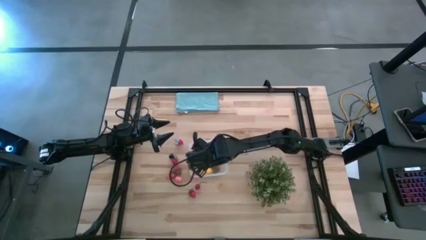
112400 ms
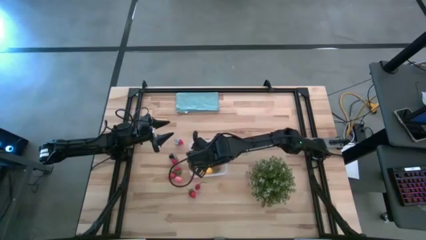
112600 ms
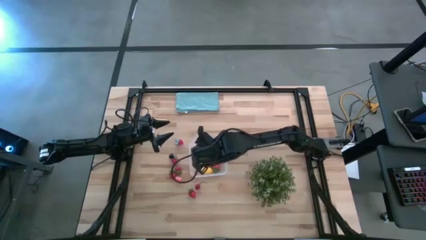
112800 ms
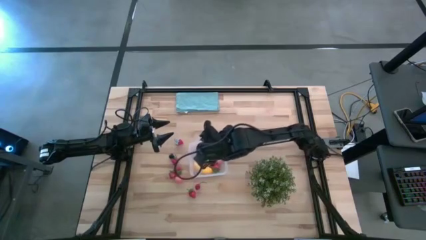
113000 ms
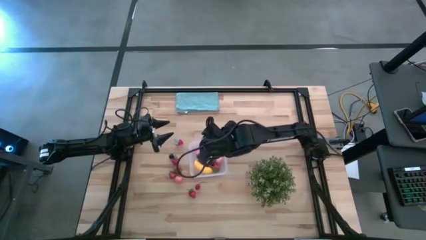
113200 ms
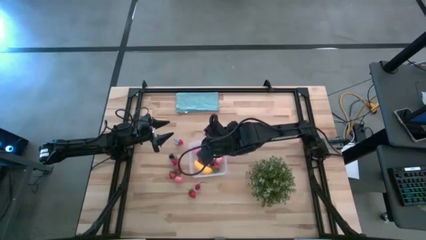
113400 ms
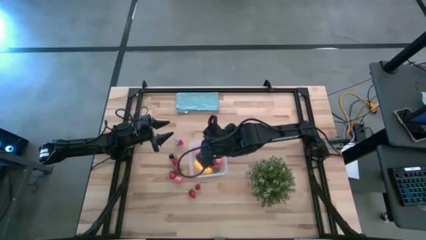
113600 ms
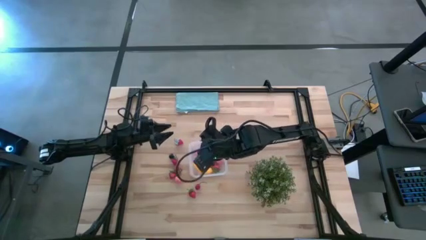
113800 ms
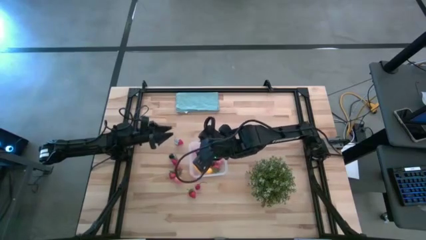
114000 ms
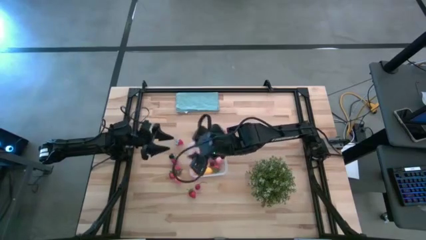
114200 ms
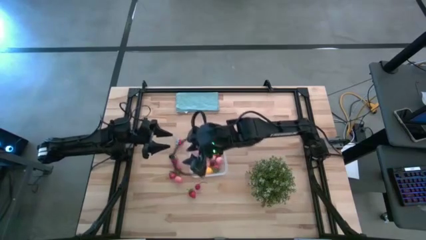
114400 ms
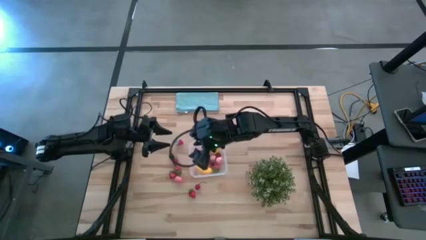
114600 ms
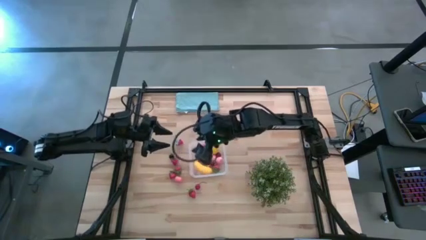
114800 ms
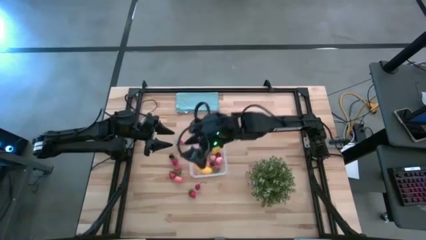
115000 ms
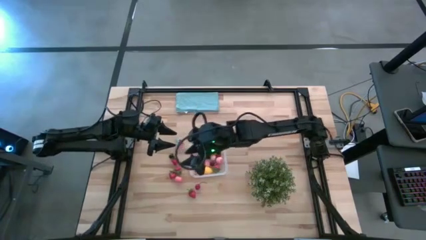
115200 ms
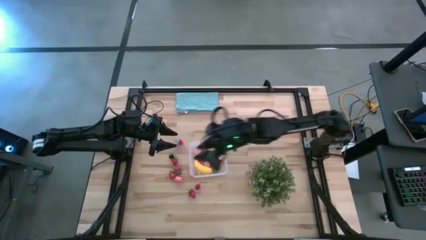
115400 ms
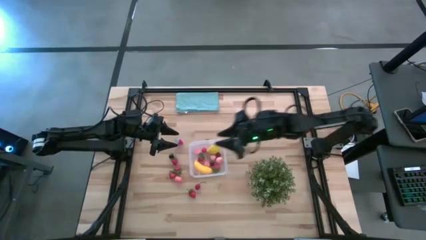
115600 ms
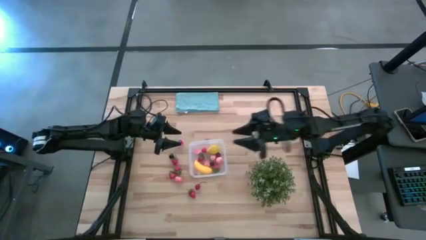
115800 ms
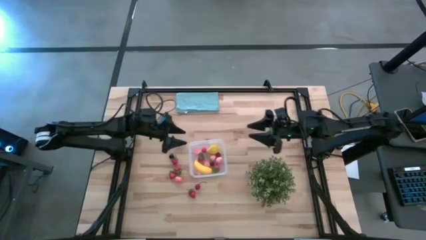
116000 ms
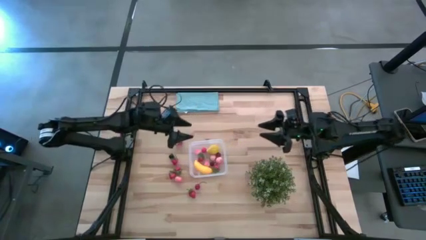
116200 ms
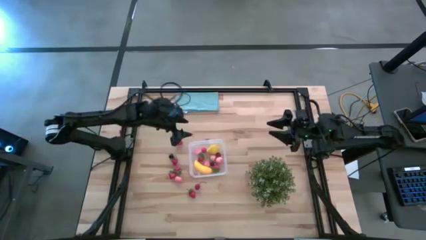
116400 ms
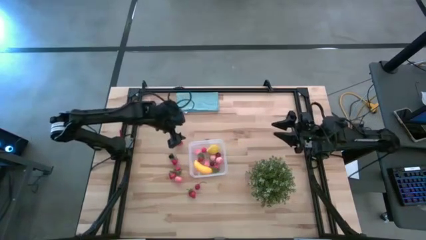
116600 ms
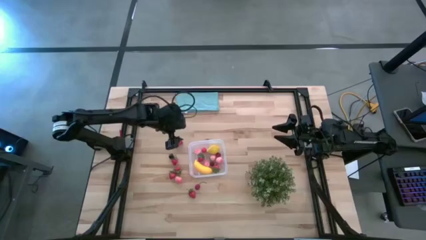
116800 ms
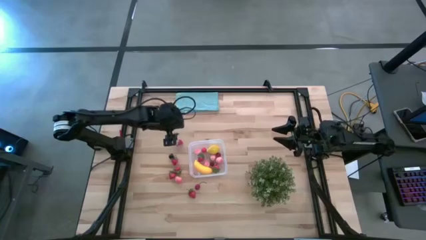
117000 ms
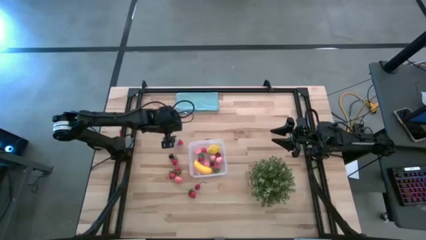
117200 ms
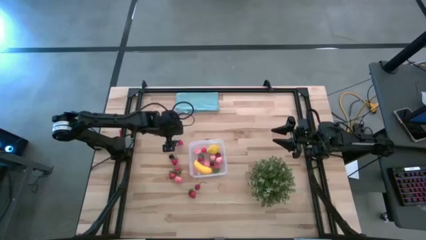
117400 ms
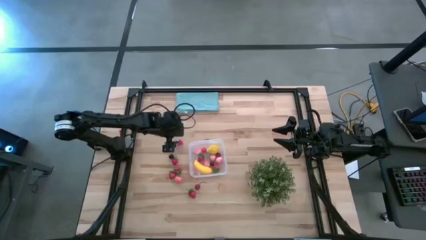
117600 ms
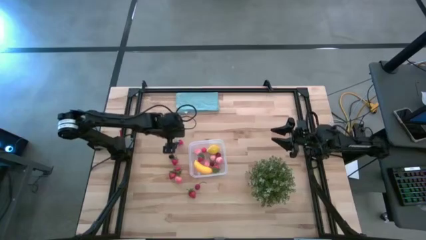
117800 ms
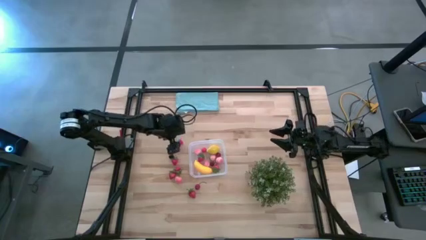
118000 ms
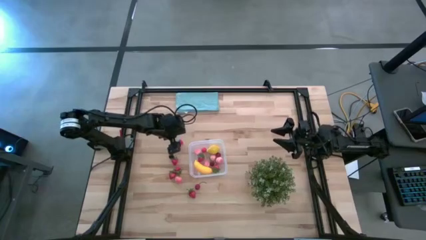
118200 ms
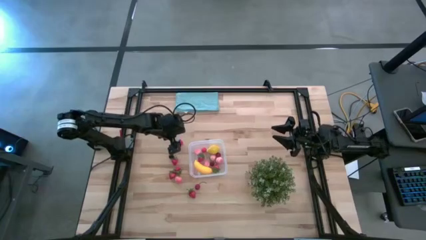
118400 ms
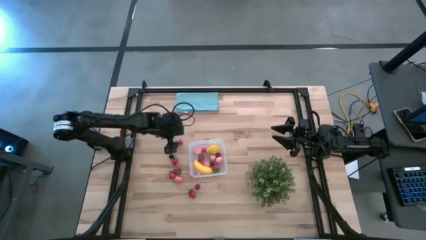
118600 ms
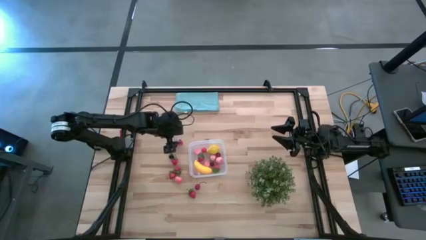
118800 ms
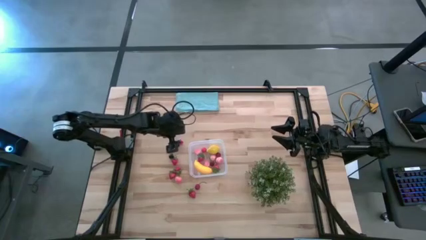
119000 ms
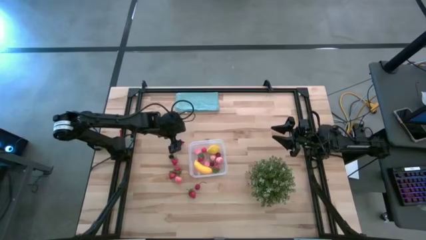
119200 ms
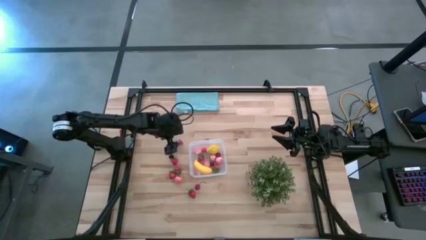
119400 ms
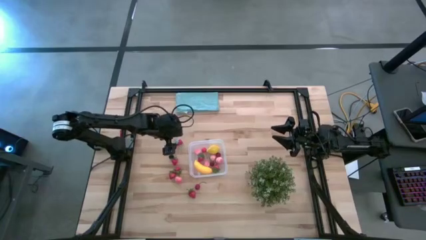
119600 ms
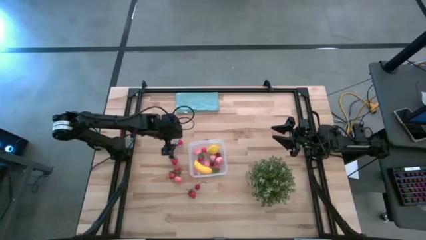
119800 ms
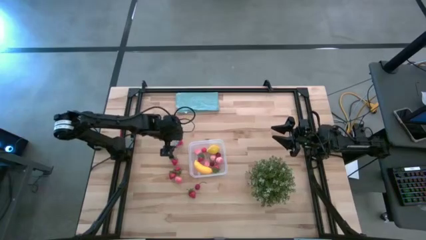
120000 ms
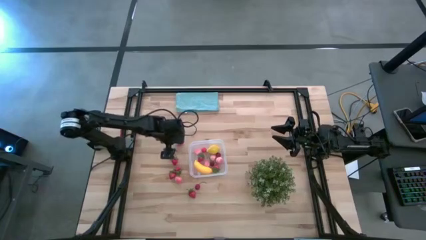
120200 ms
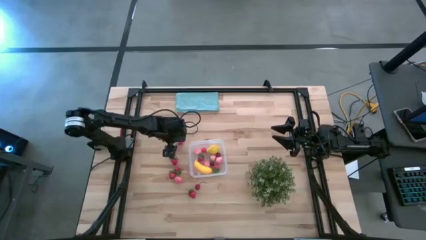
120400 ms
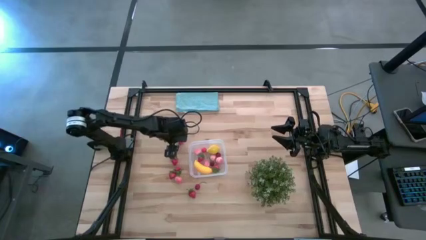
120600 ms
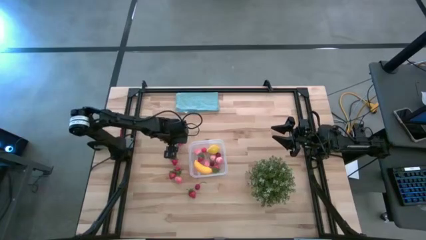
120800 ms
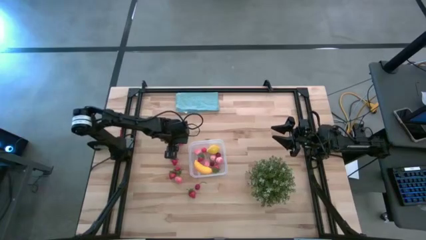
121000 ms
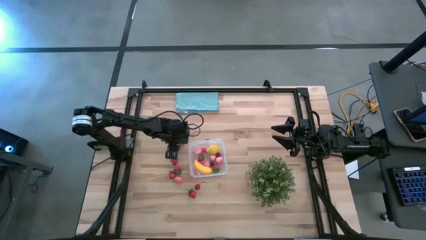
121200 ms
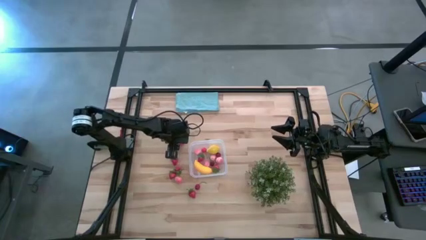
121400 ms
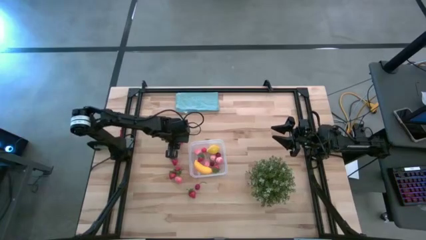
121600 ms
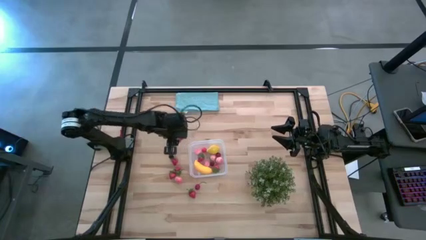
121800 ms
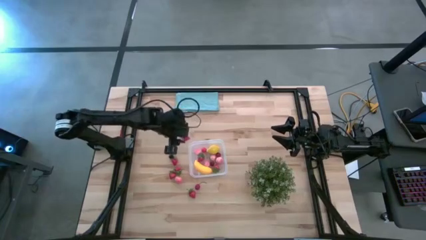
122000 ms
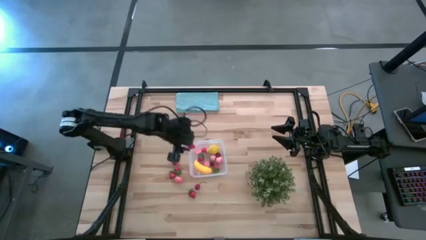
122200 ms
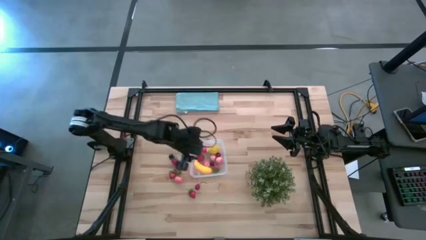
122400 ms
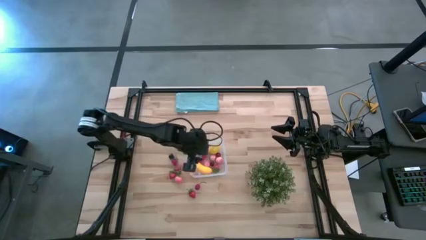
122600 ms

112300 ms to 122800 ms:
Task: Pick and placing Produce into tupperware
Put the red strawberry into the transparent bin

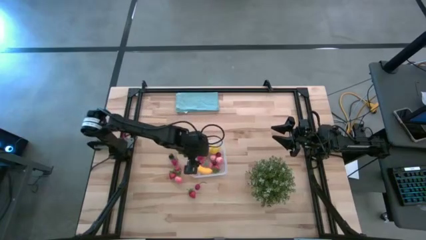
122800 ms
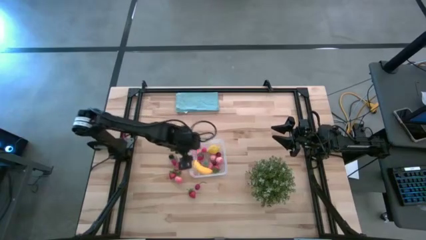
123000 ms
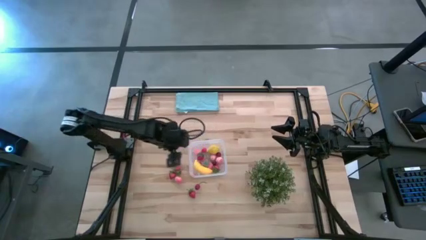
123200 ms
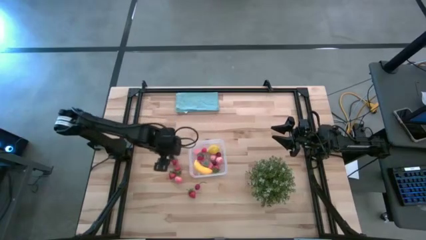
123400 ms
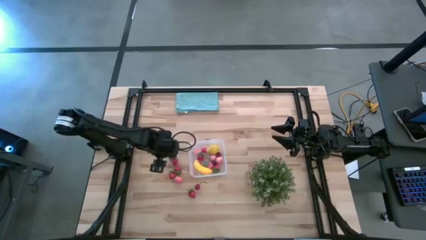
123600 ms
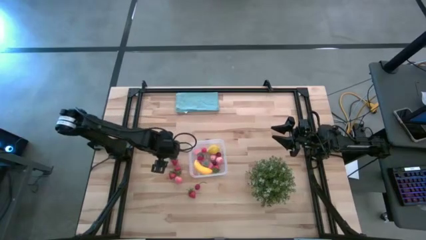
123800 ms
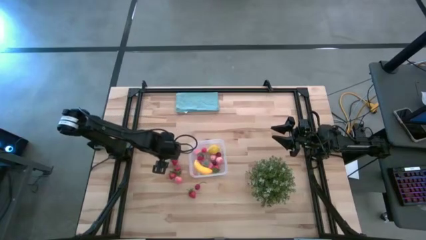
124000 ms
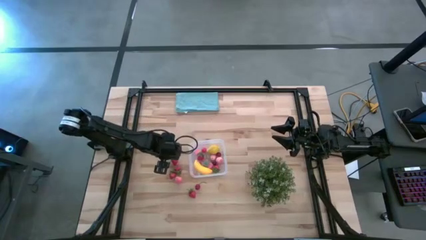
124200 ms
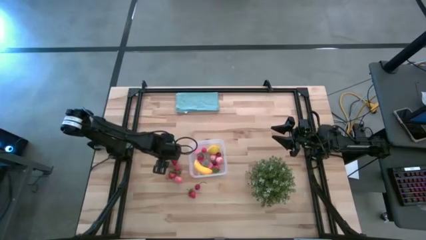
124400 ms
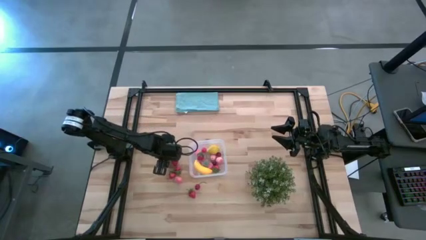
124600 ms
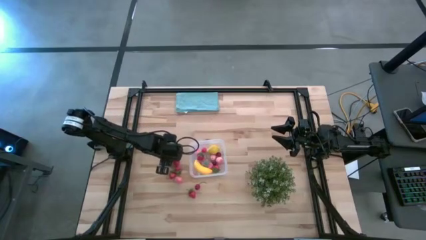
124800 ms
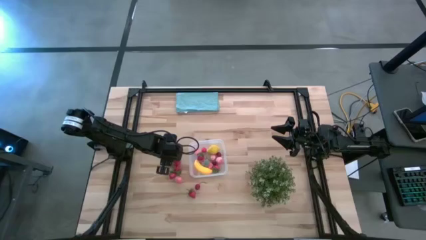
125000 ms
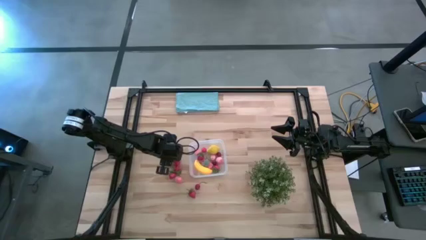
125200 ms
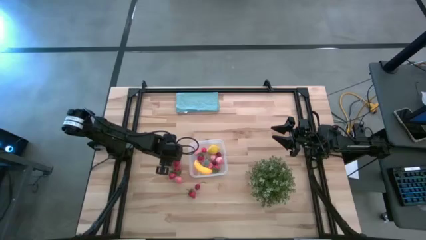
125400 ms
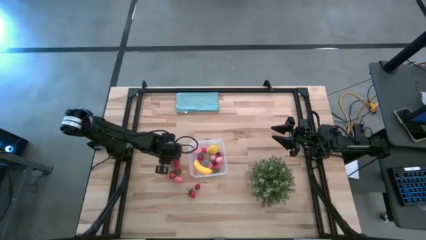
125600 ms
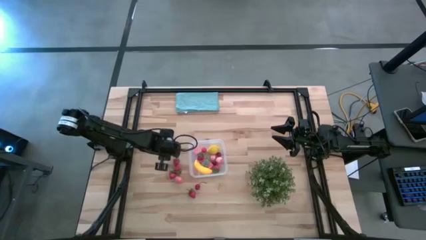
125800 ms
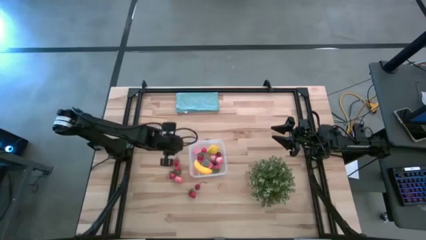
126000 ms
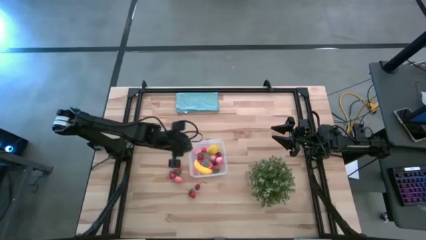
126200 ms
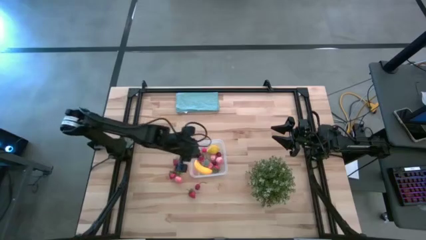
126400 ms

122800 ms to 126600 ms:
Put the black cherry into the transparent bin

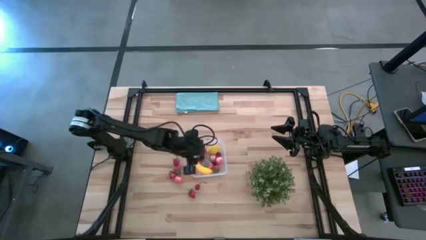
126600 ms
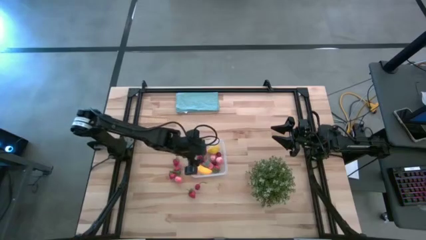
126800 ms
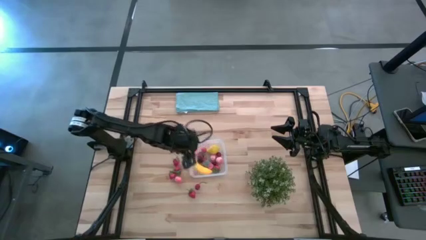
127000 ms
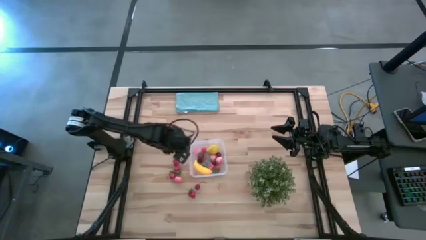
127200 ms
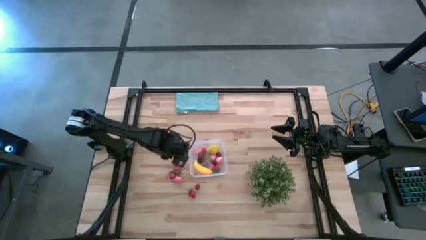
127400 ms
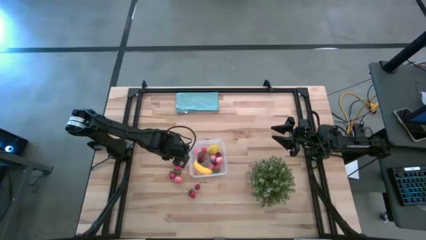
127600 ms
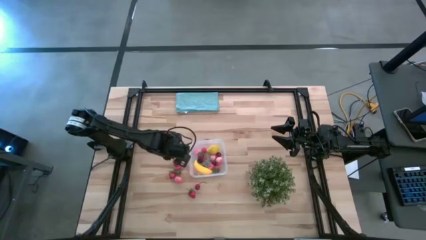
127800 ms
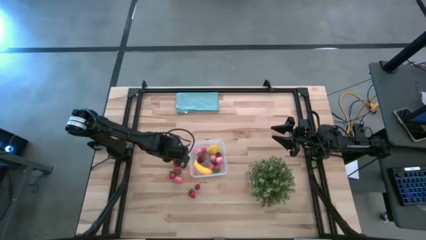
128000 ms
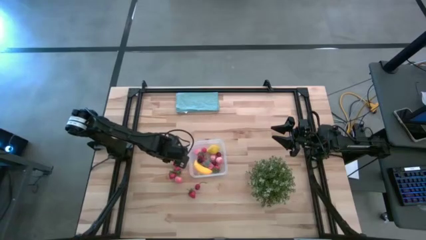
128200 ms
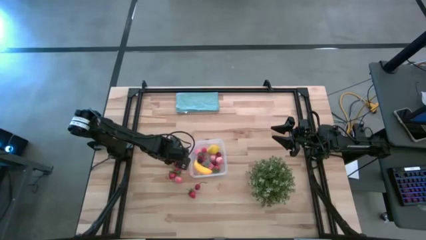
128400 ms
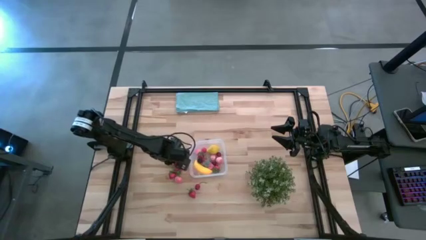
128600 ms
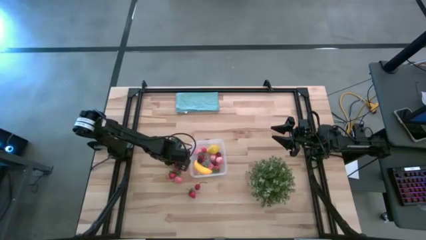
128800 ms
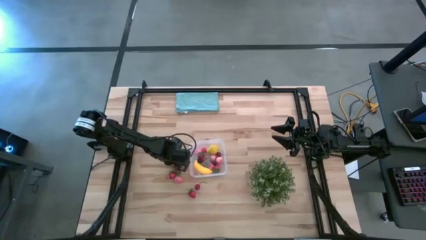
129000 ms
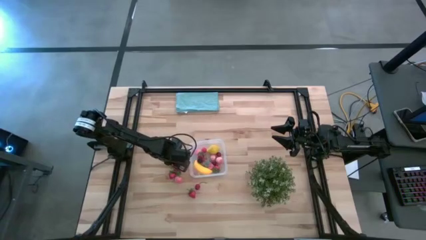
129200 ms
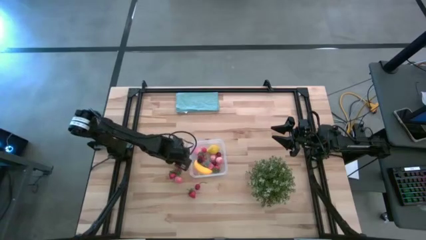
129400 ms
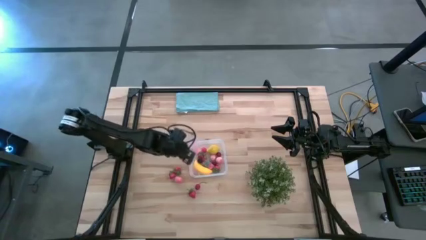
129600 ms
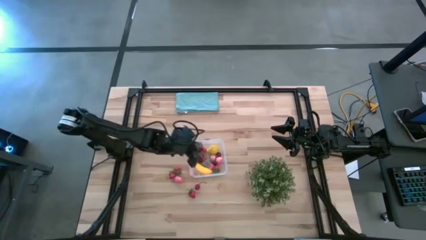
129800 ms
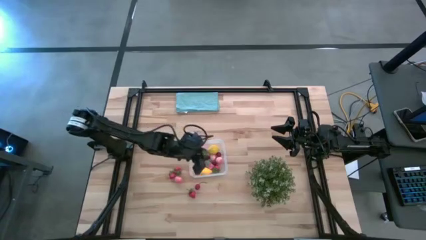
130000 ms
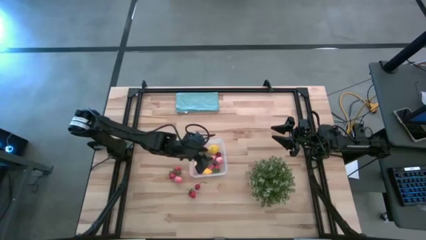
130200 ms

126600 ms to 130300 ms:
Put the red strawberry into the transparent bin
